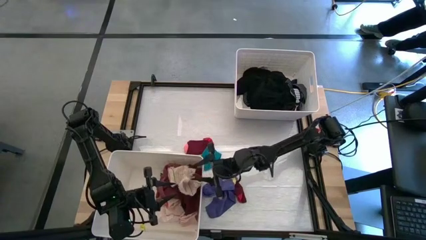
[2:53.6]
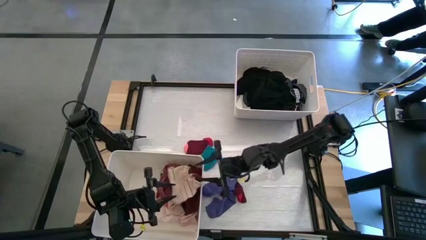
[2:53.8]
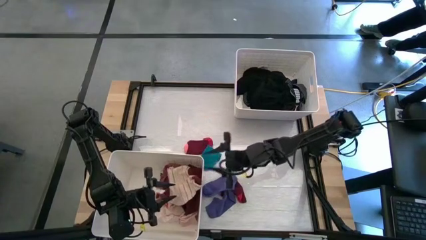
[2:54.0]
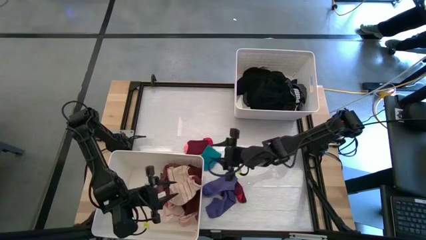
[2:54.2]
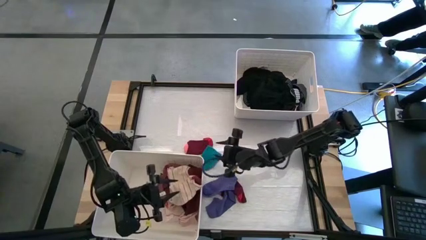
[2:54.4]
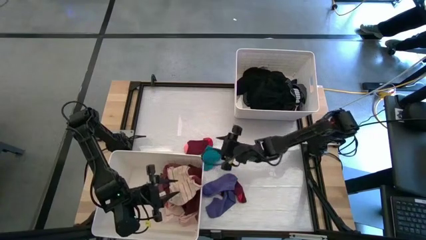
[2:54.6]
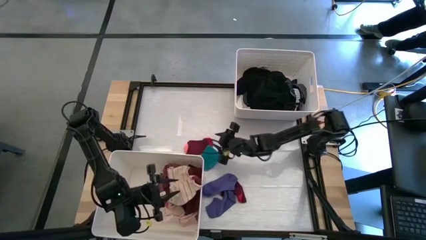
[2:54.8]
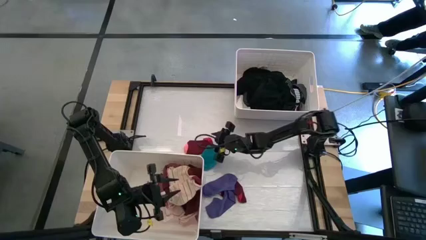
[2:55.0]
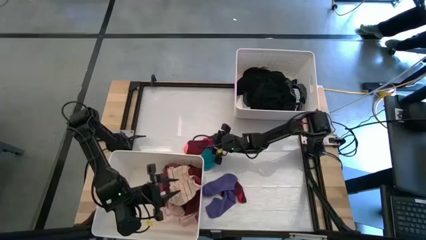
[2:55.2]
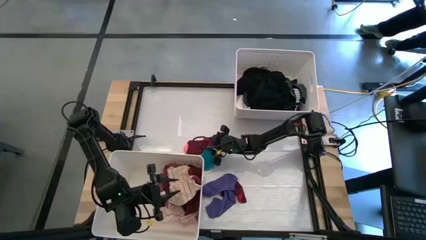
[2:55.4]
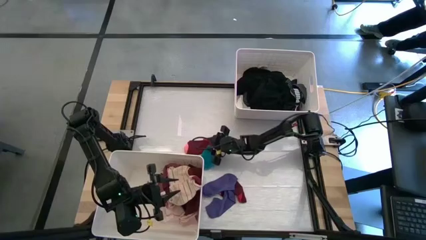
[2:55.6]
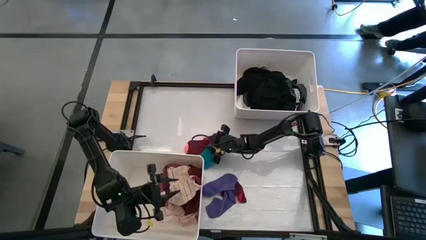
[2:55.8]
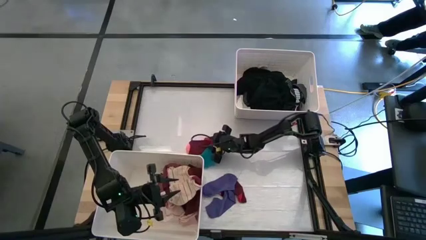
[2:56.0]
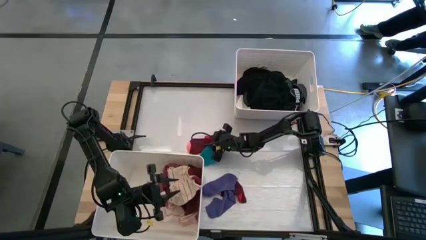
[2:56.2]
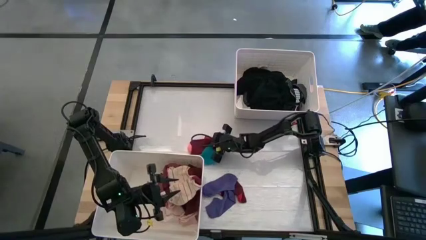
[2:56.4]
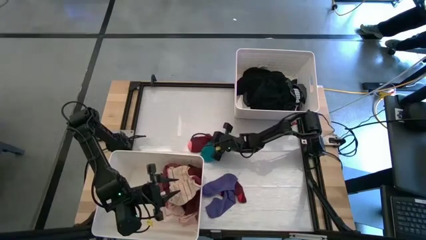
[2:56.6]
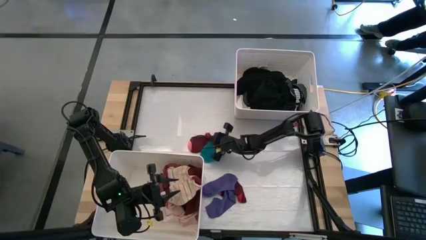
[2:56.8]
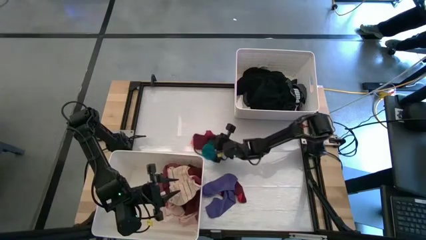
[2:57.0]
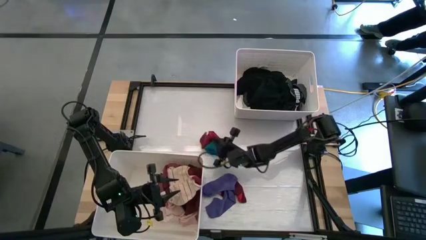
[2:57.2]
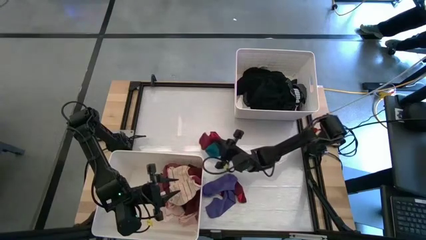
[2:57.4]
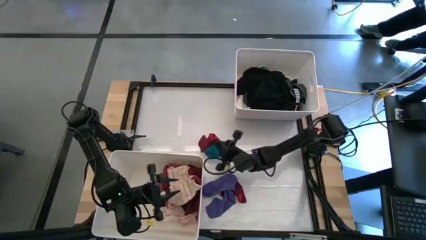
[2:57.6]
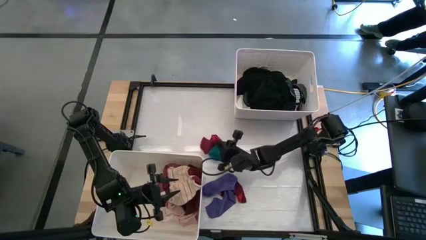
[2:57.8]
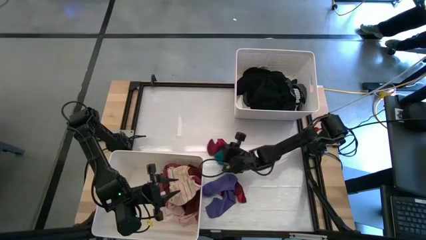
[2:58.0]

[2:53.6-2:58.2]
Task: Sort clothes
Put the red sock into the bottom white laundry bin

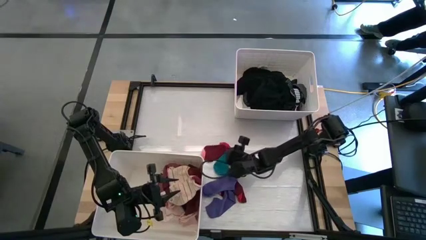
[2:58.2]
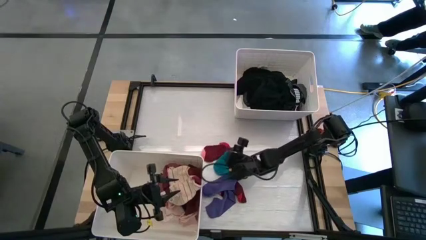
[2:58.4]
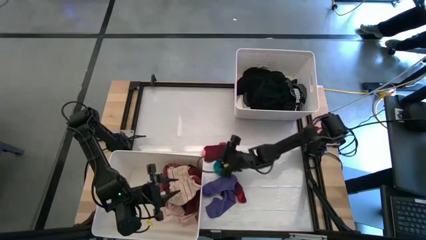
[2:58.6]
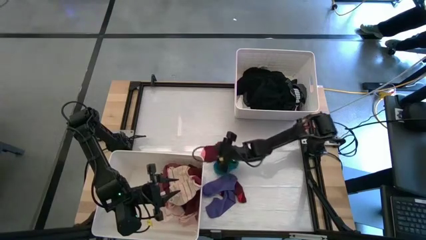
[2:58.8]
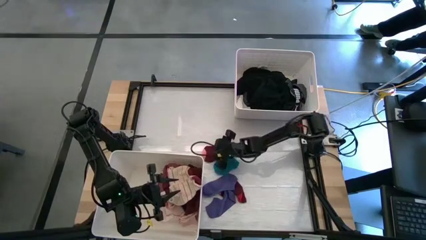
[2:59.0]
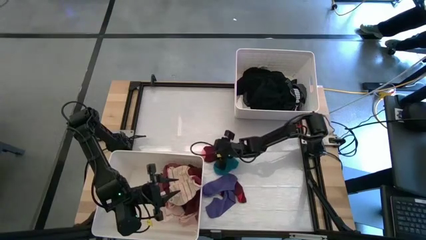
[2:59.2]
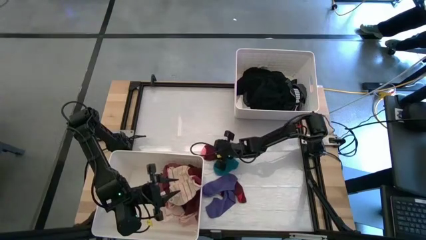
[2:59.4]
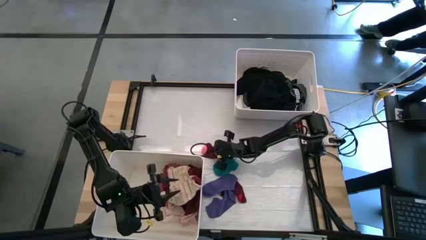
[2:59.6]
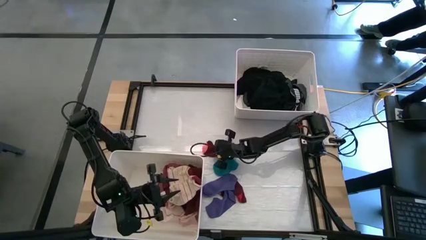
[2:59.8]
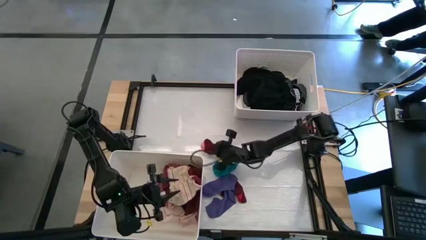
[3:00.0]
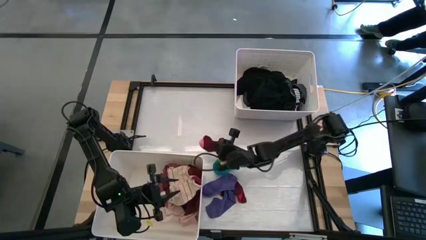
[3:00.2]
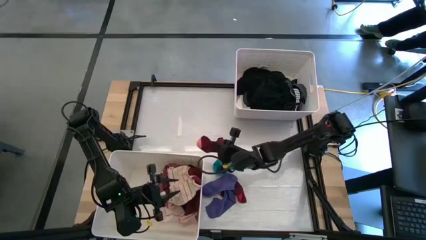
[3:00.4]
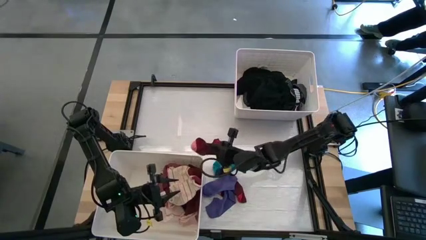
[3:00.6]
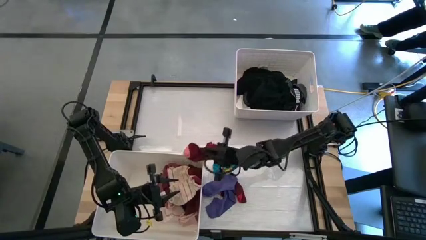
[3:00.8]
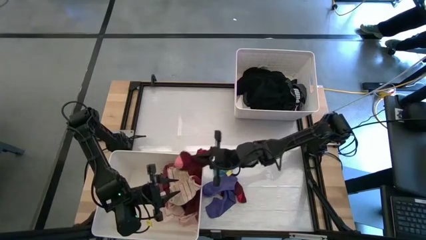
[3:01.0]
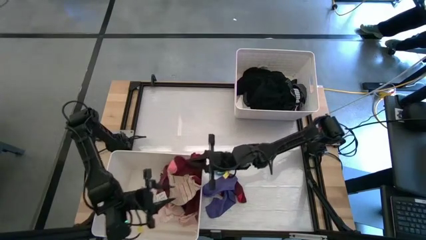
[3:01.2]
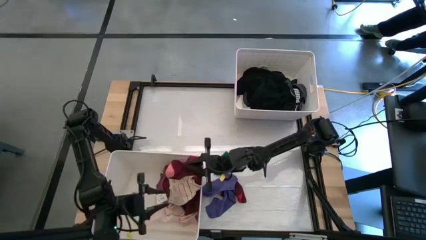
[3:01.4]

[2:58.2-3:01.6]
Put the red sock into the bottom white laundry bin

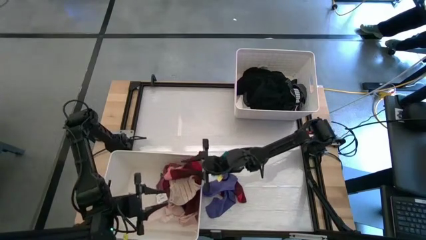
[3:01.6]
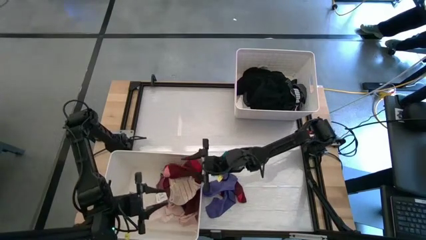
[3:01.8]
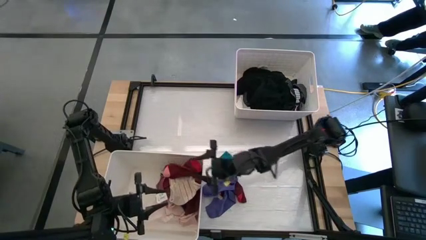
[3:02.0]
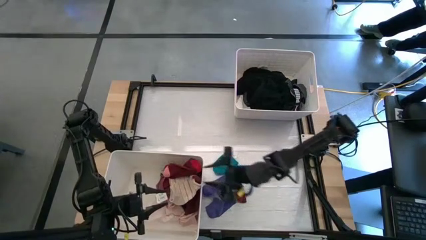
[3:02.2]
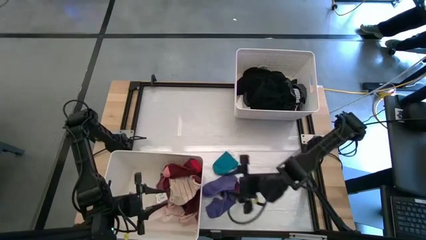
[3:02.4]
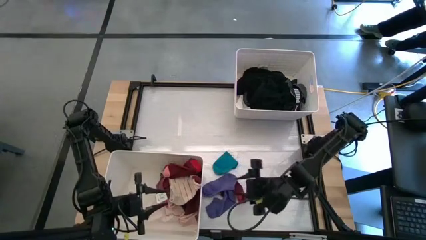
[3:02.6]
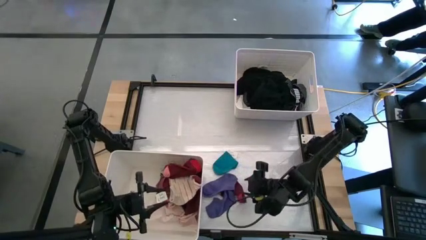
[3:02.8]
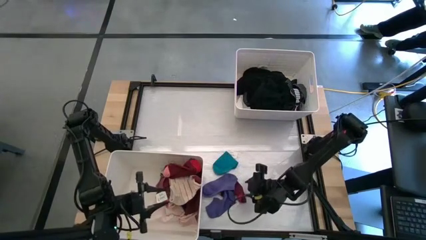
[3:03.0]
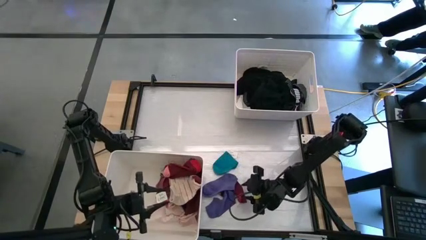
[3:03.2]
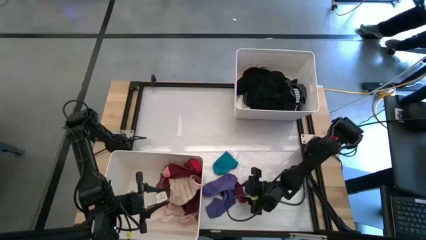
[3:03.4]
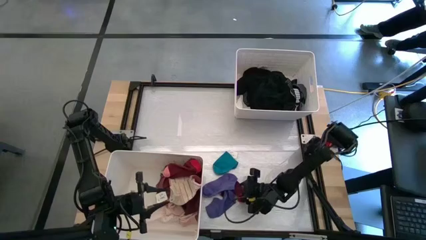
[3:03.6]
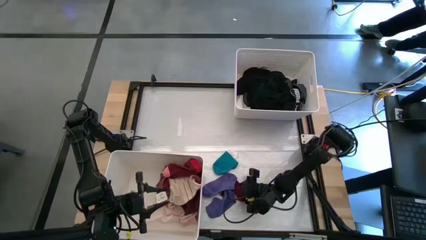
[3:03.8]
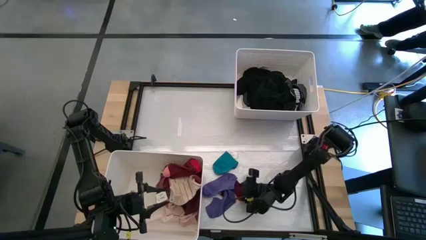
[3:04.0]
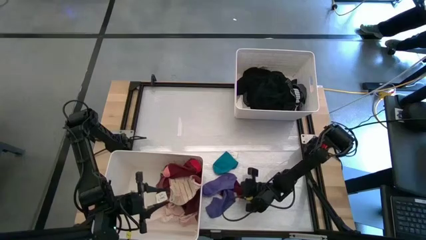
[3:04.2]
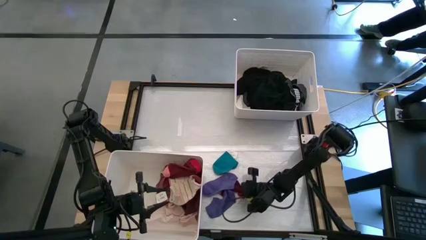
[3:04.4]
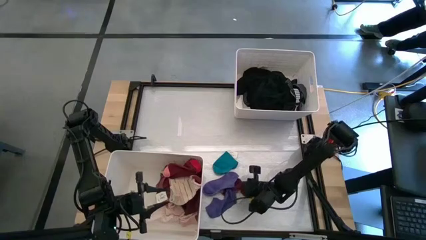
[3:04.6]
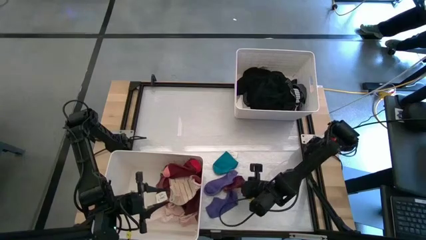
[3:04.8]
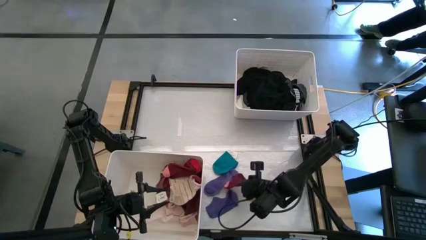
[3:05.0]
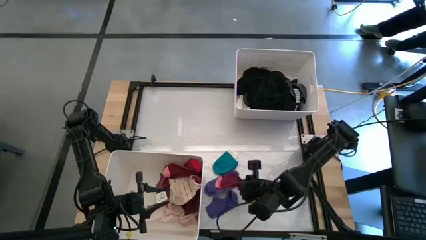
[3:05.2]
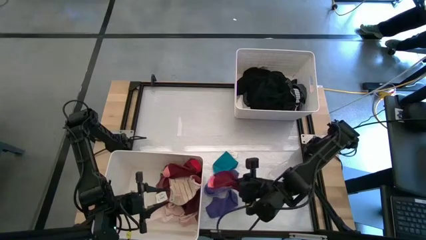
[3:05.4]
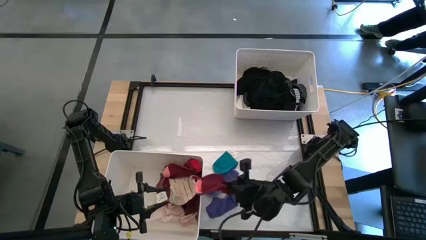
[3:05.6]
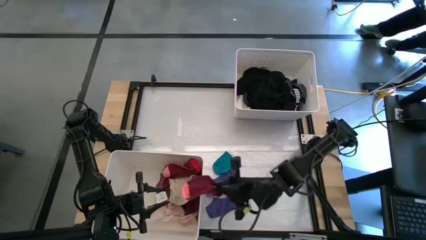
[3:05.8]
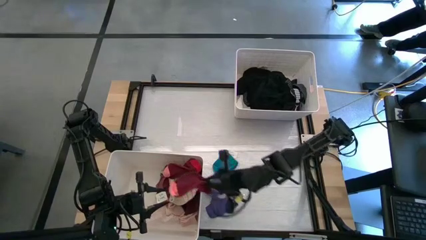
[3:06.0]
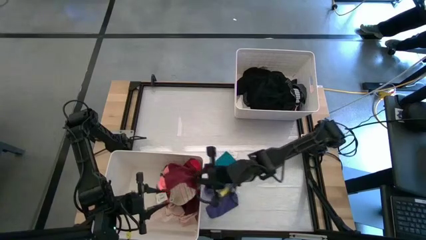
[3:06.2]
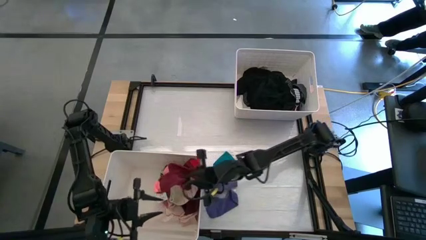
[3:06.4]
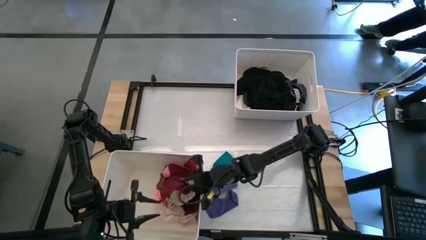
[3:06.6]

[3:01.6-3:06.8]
Put the red sock into the bottom white laundry bin

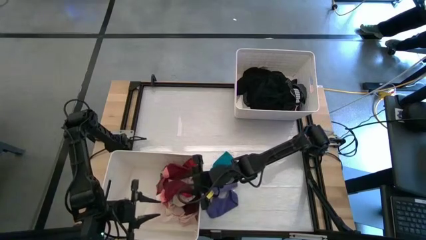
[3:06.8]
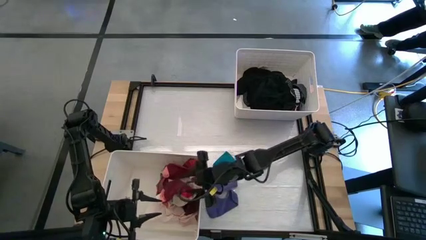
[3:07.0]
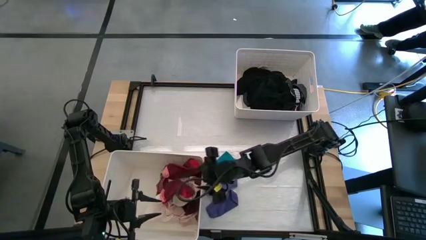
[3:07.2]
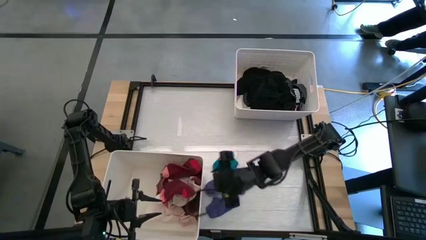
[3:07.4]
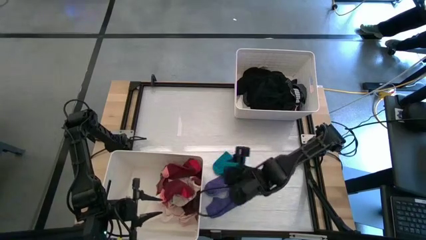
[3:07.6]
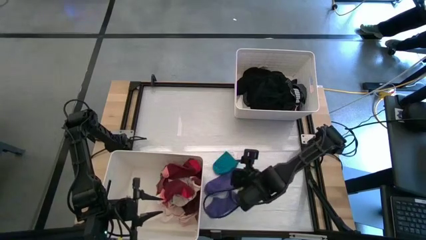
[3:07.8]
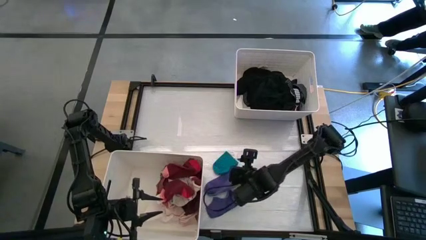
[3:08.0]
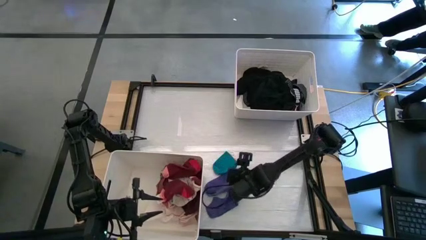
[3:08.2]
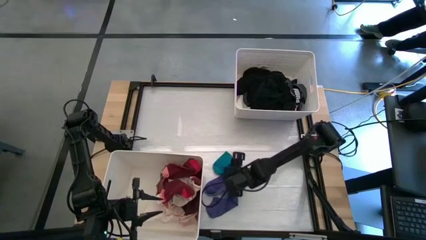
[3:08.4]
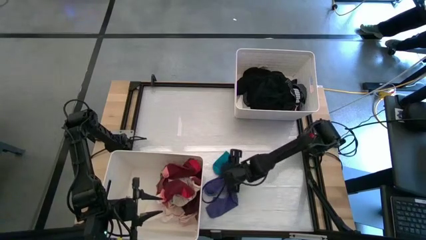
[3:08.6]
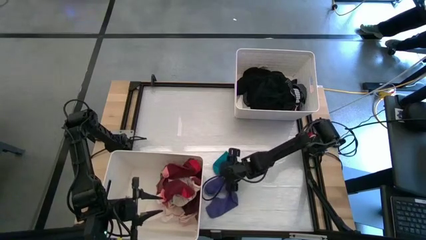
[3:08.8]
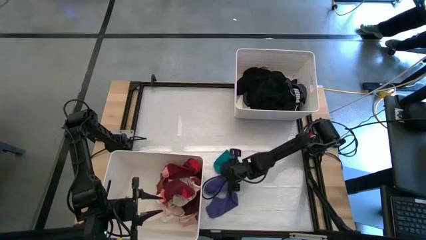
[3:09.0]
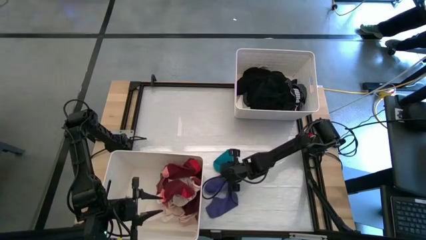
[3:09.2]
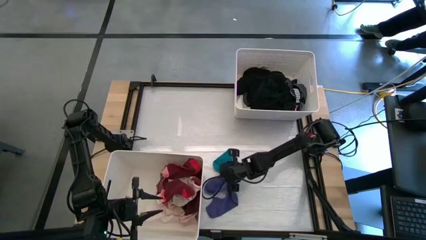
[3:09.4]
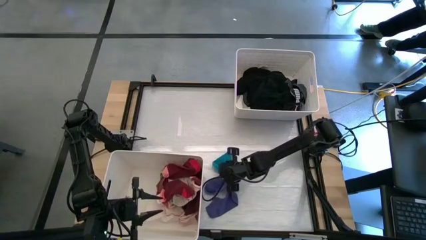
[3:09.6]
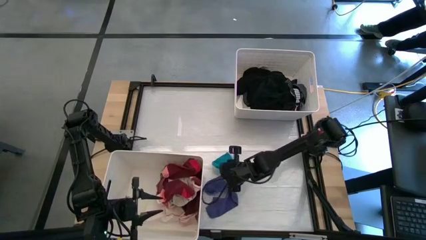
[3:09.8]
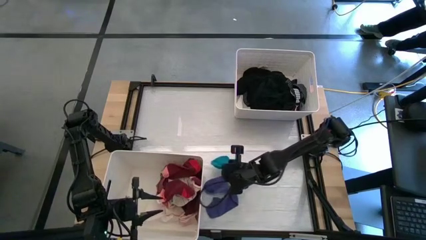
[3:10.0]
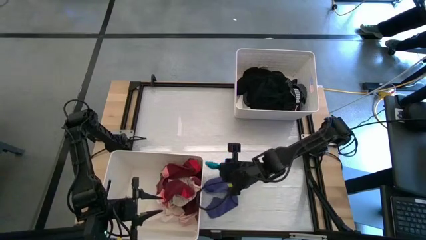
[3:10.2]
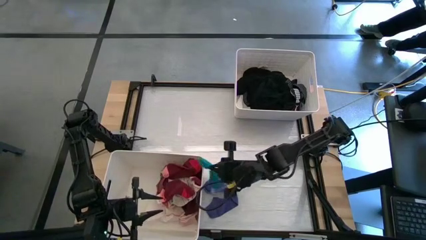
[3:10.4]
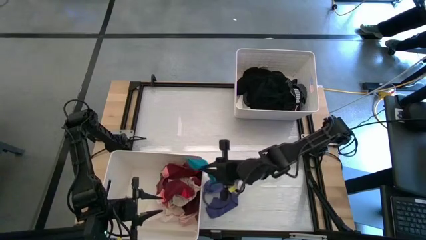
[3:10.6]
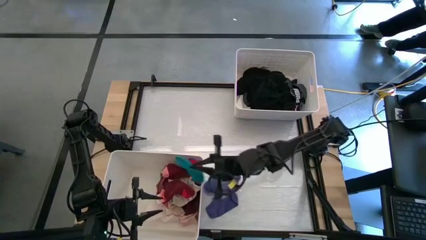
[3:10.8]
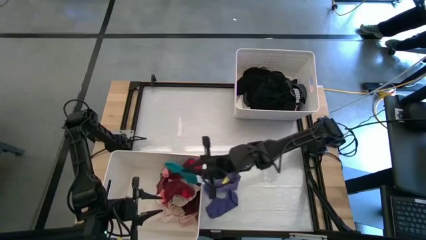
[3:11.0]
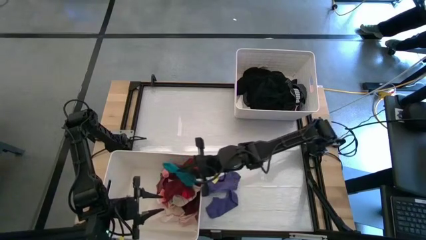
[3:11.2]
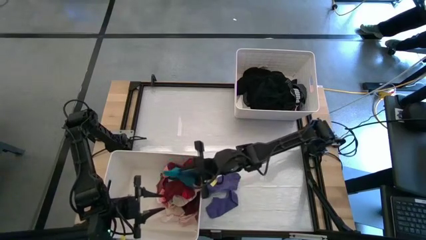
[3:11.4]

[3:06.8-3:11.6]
Put the blue sock into the bottom white laundry bin
